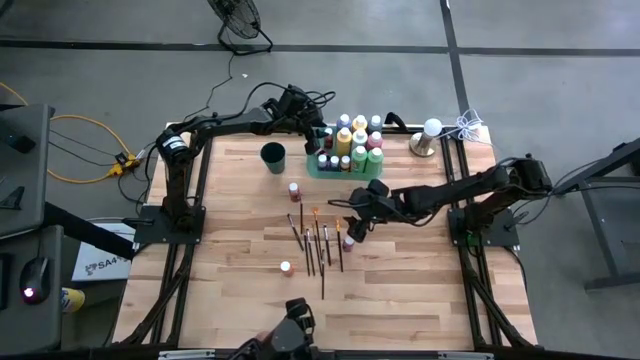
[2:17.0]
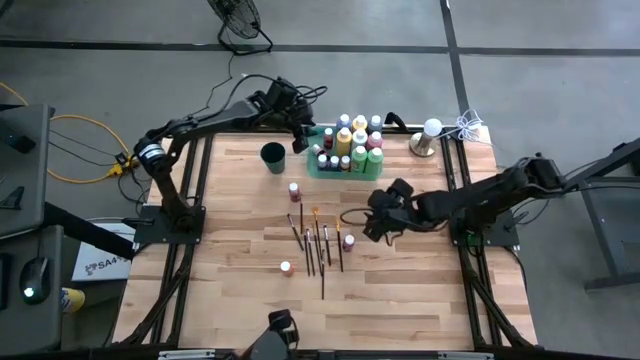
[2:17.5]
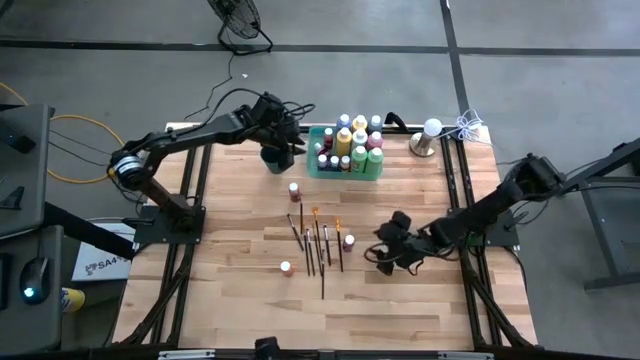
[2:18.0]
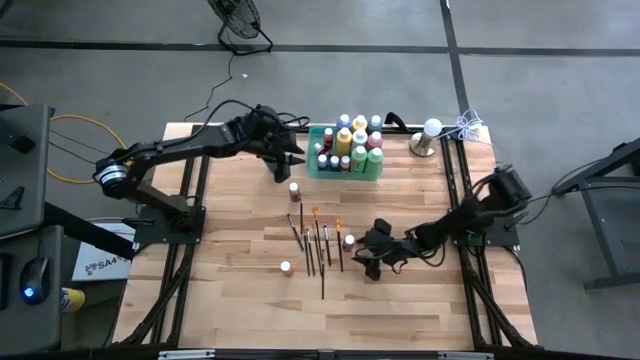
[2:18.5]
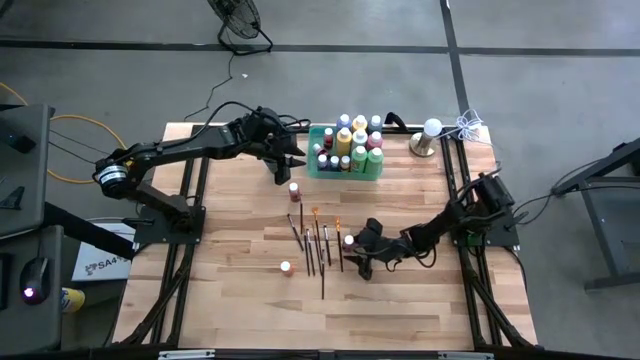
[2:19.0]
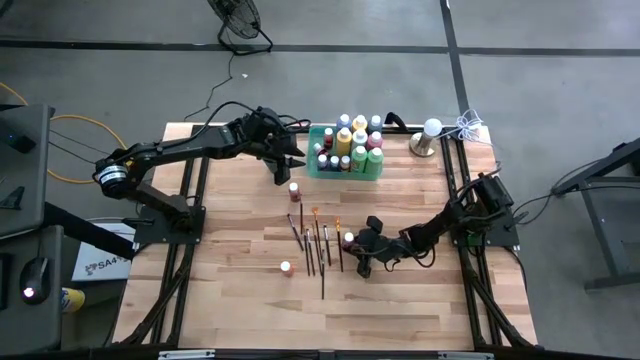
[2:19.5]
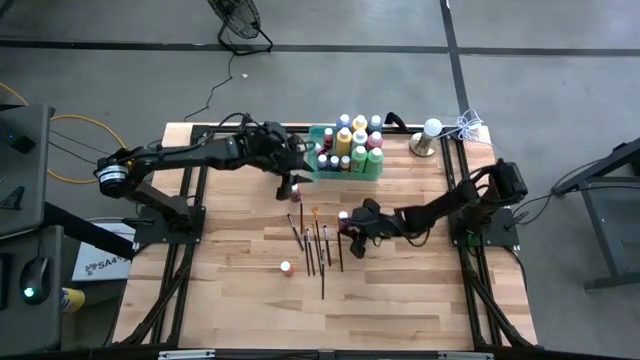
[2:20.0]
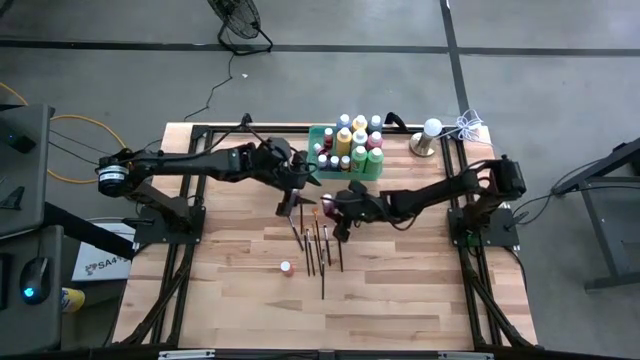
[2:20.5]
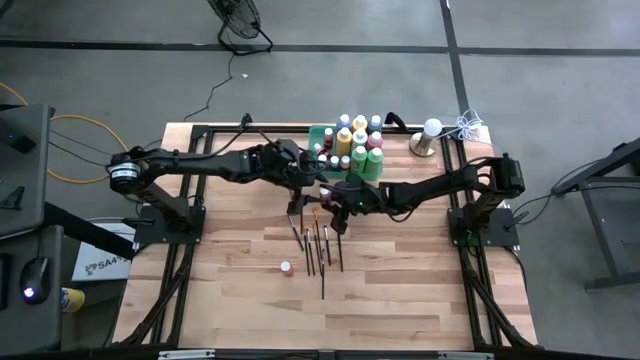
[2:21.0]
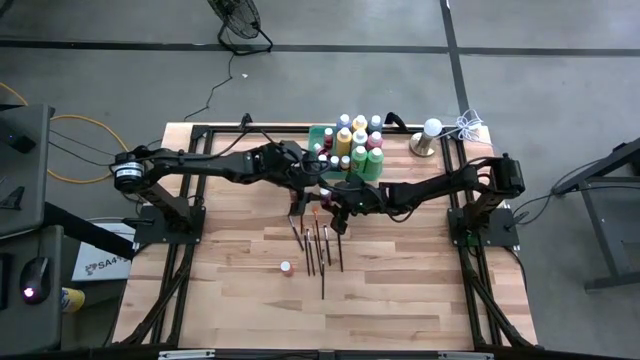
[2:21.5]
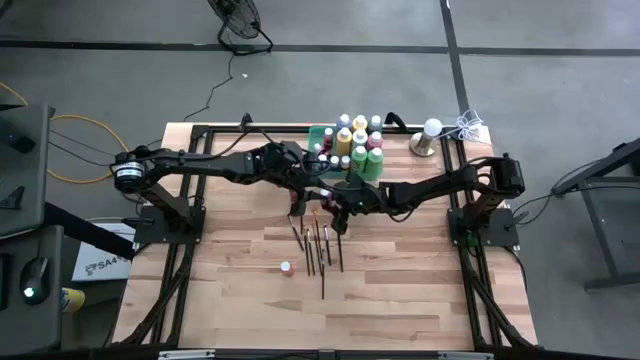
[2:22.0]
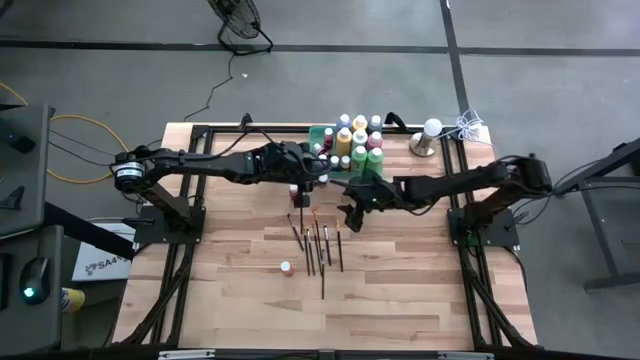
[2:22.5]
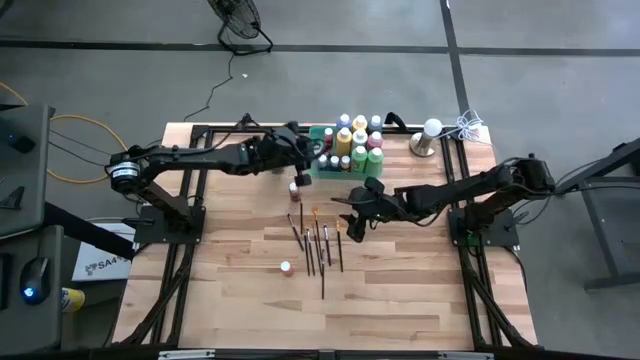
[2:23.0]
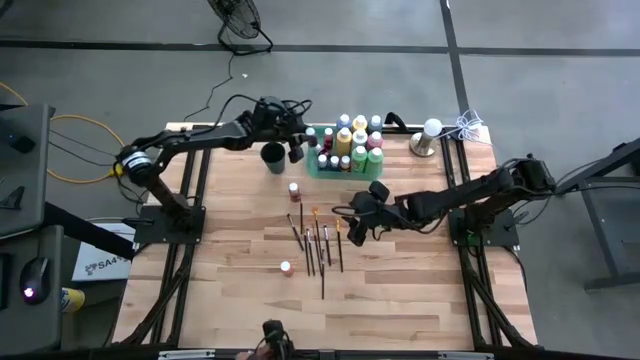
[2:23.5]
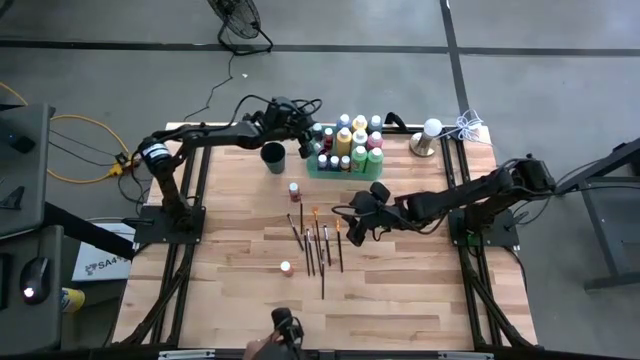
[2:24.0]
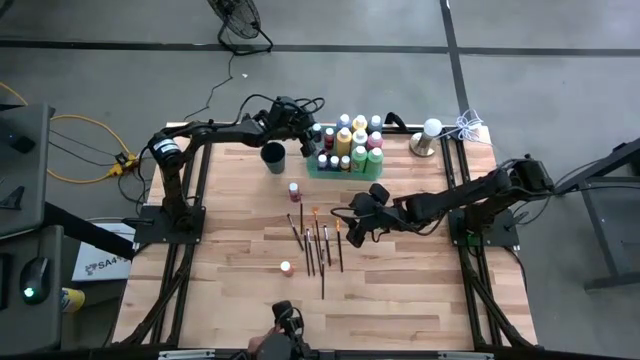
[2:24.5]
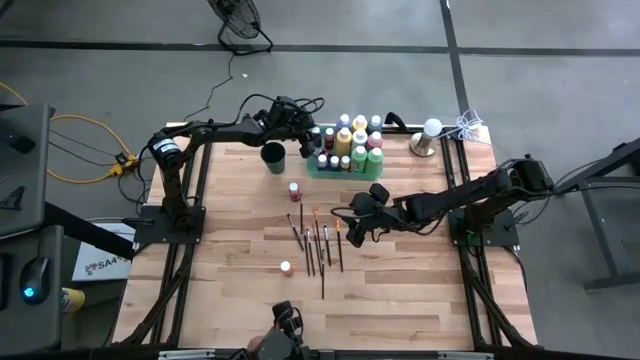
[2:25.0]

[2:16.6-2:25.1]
Task: Pick & Place Paint Supplies
Put the small pink paint bottle into the green bin

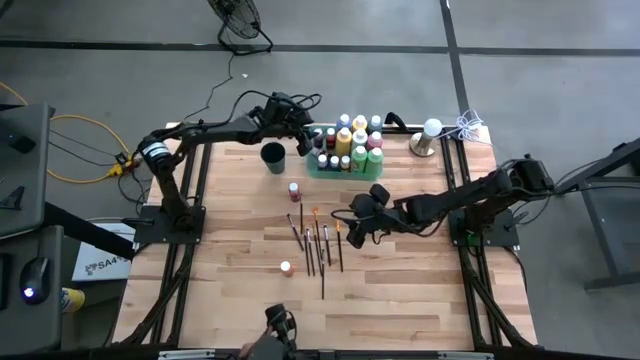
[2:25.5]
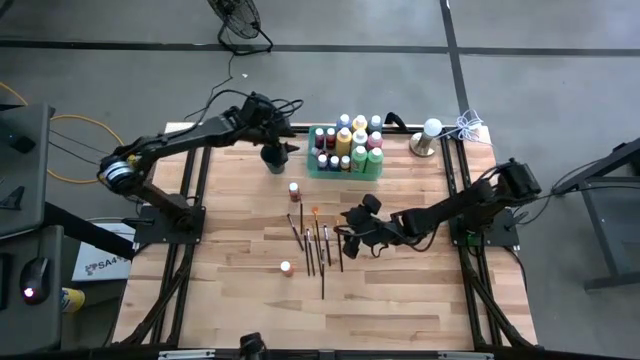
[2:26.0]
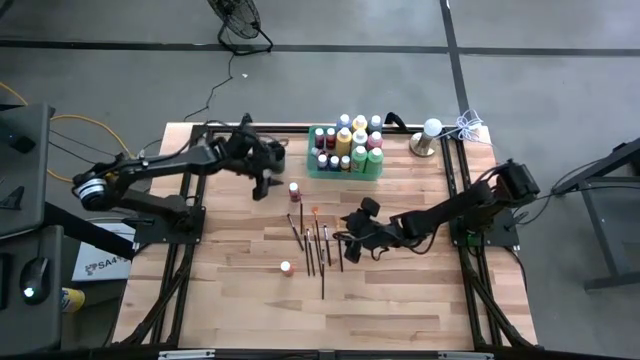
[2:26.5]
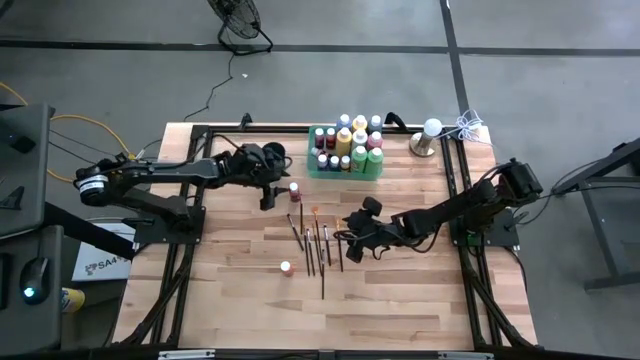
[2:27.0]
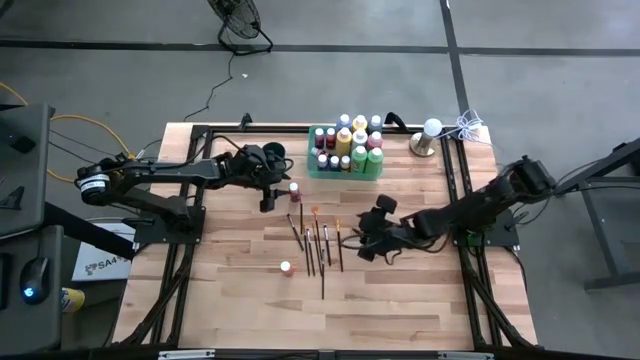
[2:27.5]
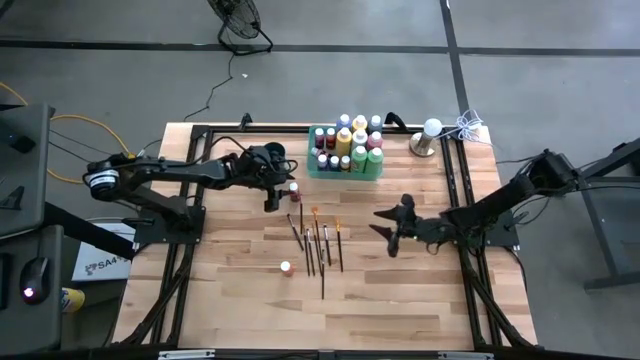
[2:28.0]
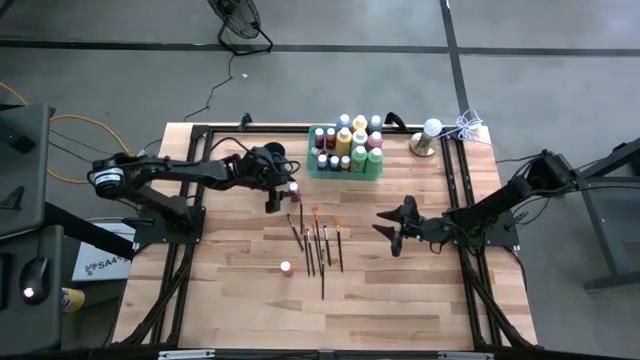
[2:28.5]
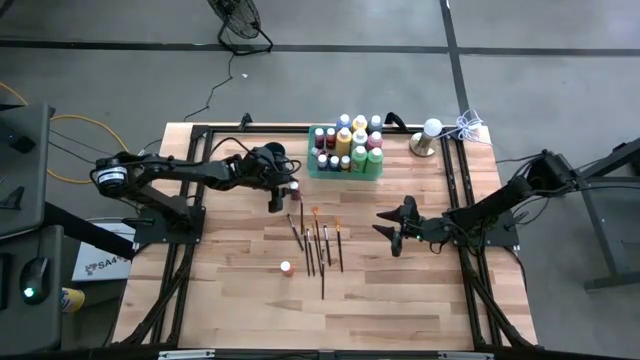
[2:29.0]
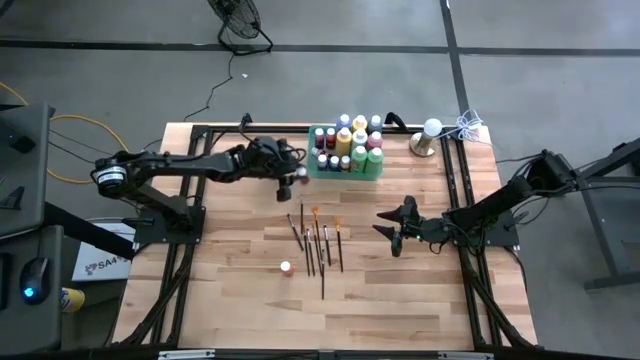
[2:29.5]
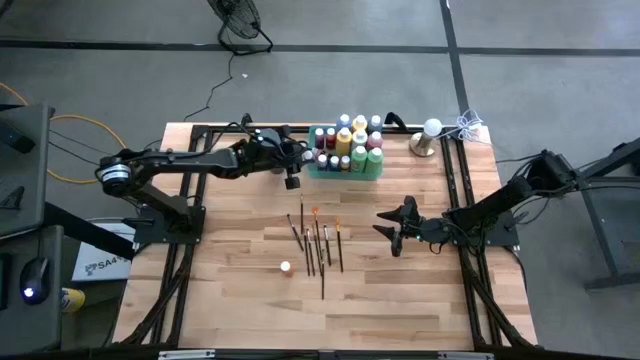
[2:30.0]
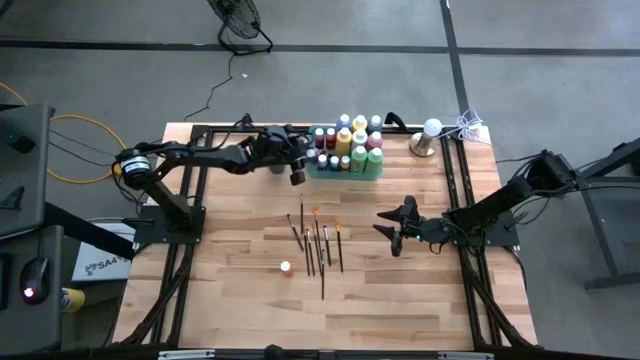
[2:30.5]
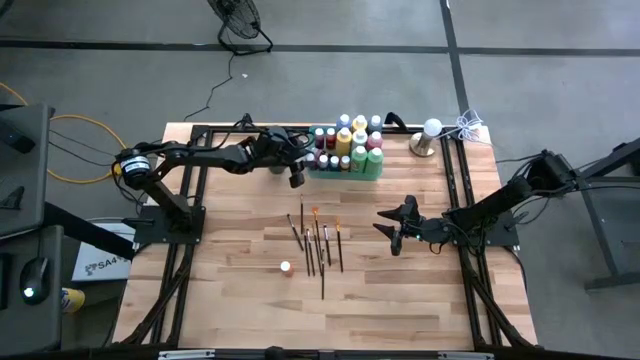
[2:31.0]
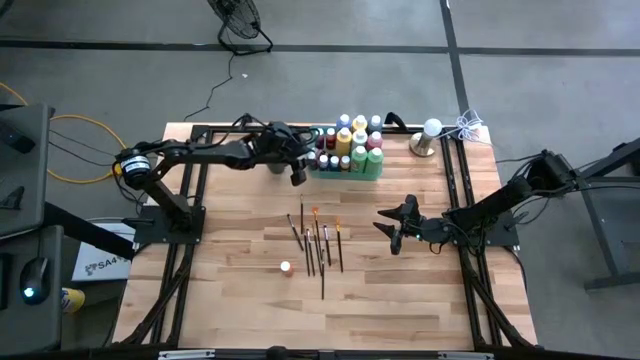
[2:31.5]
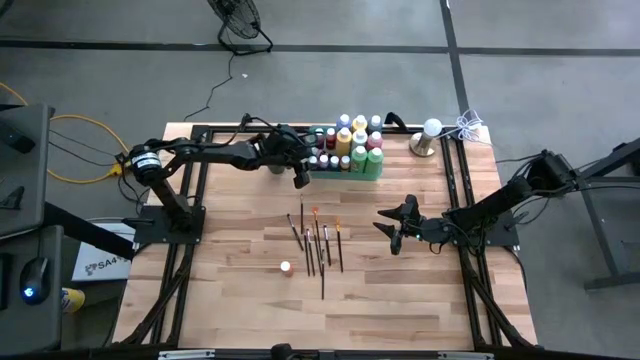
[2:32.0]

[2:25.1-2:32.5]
Put the small red paint bottle into the green bin

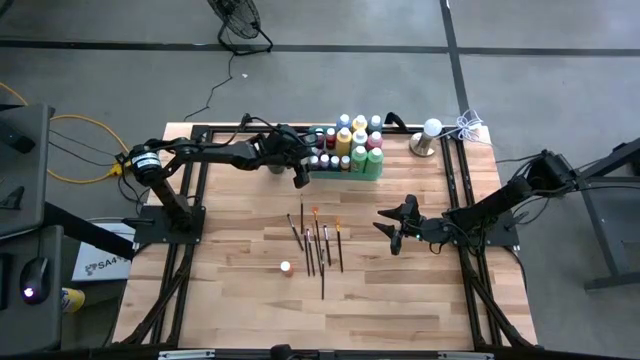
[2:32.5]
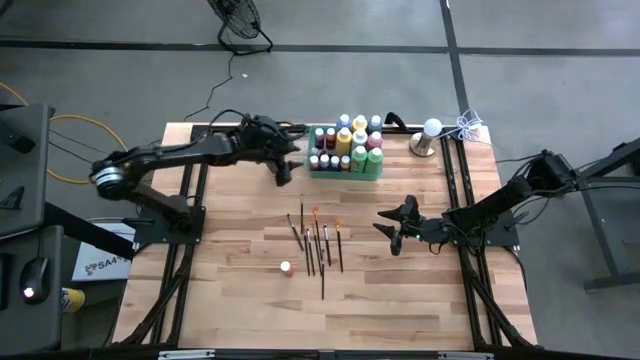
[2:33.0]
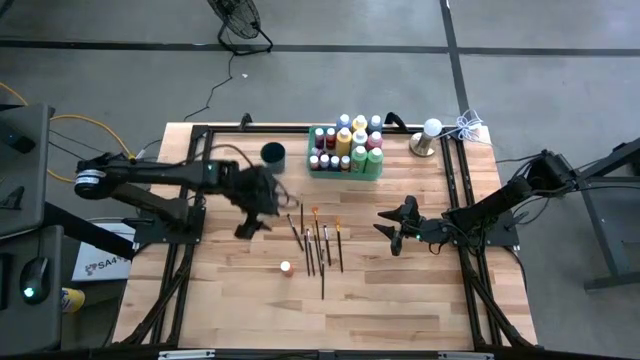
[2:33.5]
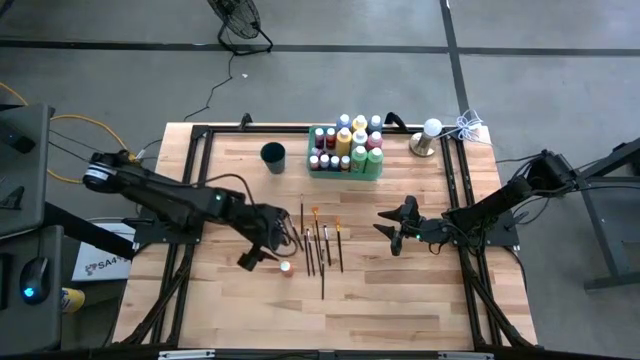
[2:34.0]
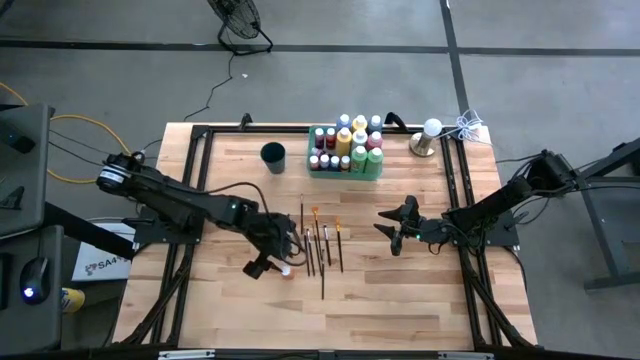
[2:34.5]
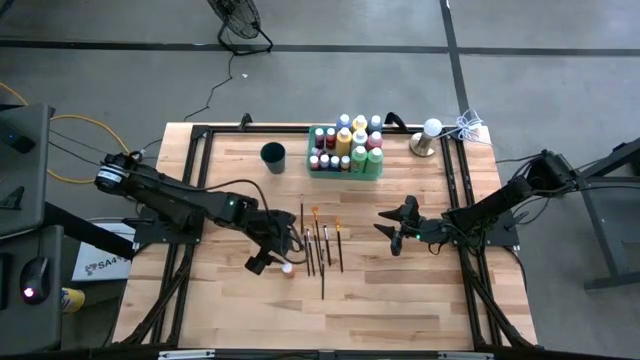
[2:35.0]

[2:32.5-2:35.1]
Put the small orange paint bottle into the green bin

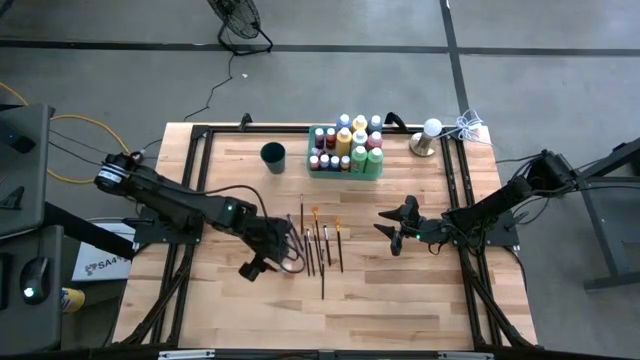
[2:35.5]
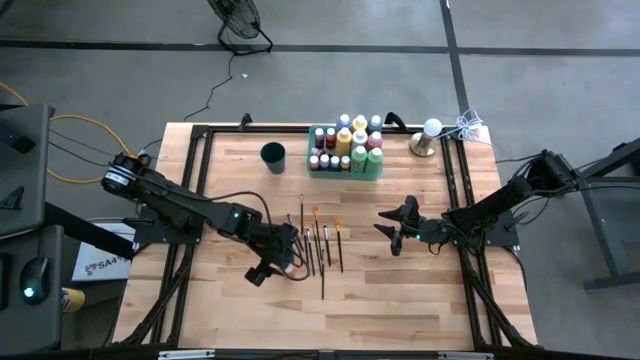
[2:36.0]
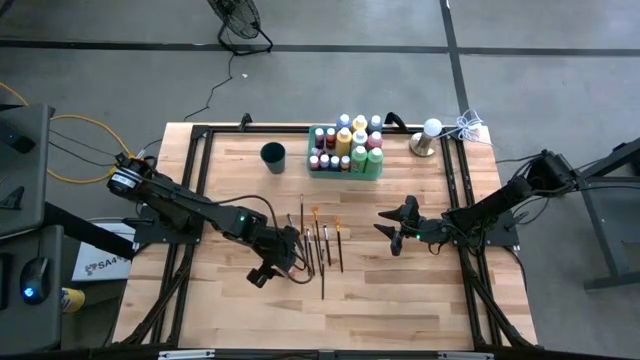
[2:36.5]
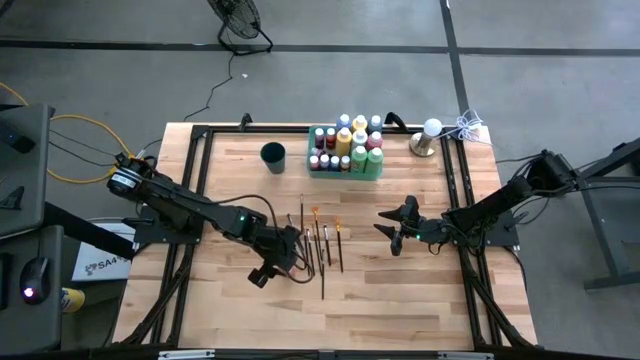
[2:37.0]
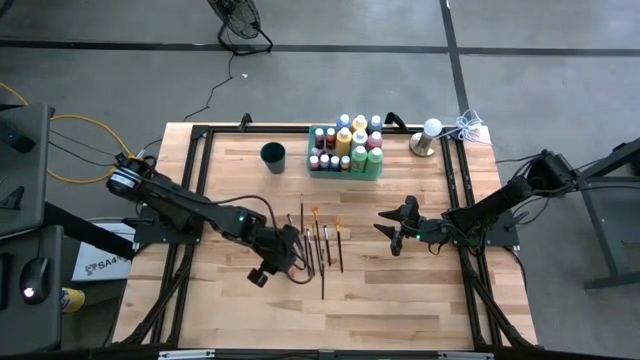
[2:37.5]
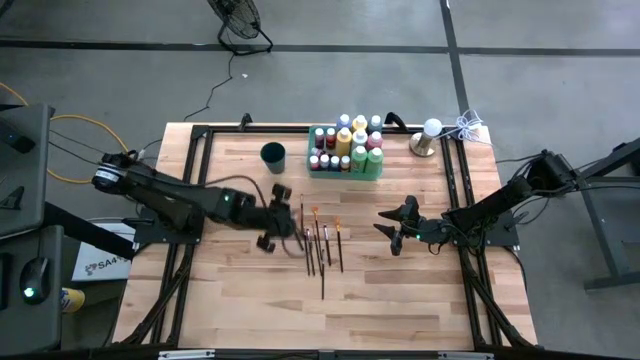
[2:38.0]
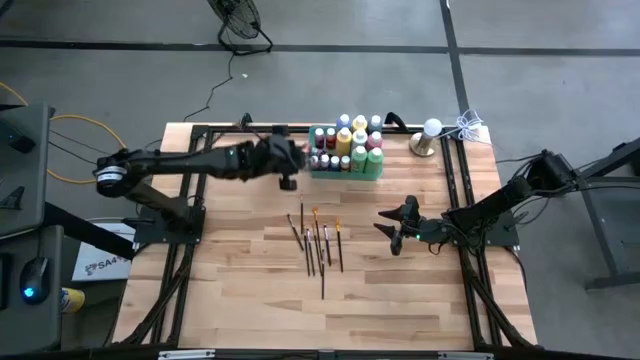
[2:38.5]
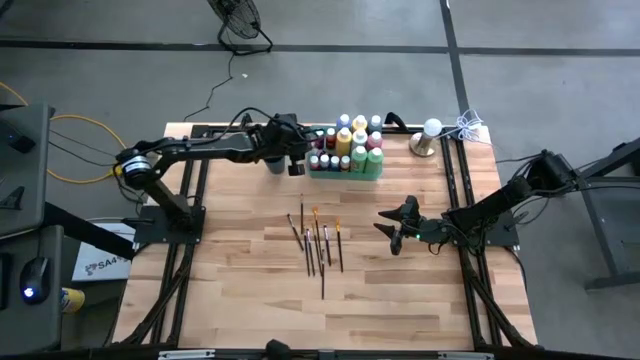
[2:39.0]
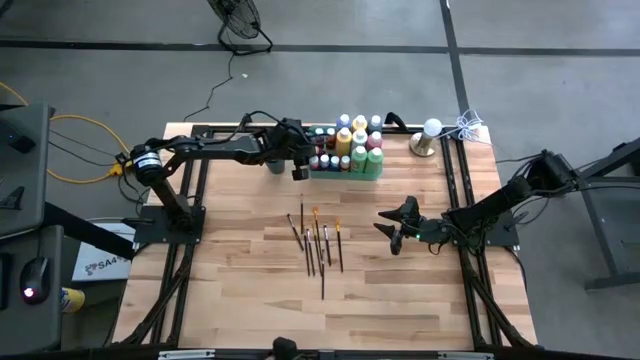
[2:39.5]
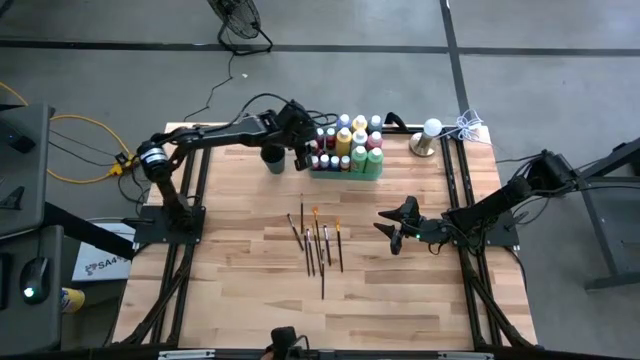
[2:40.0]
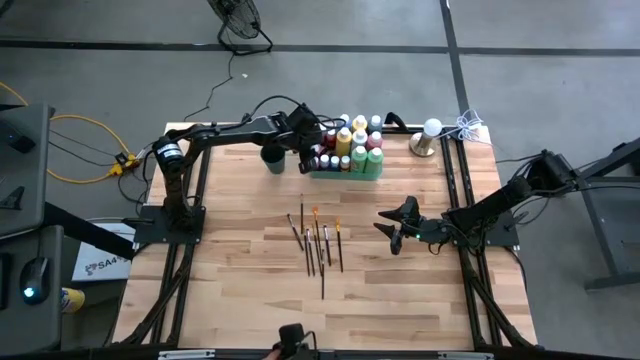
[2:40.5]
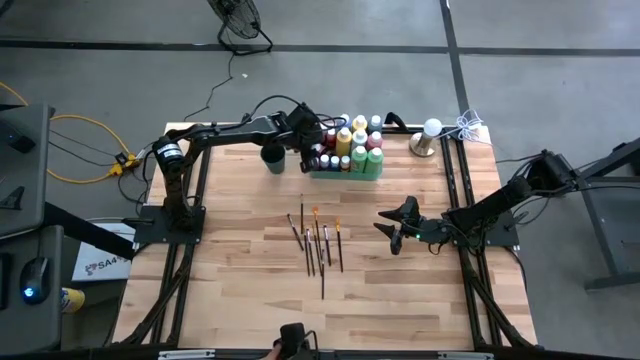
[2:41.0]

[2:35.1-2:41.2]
Put the small orange paint bottle into the green bin
